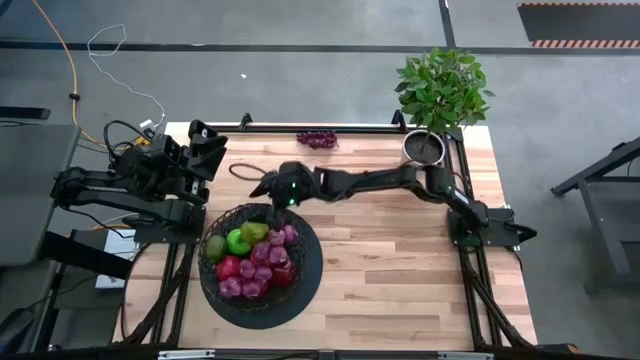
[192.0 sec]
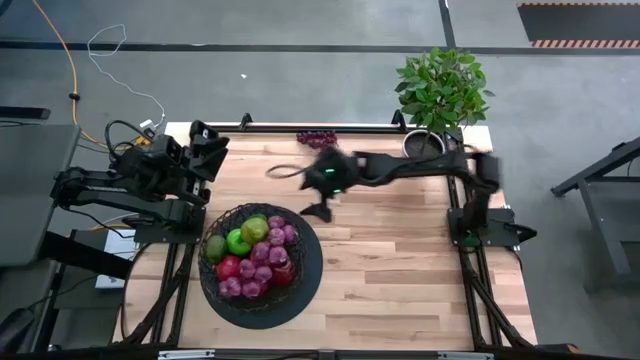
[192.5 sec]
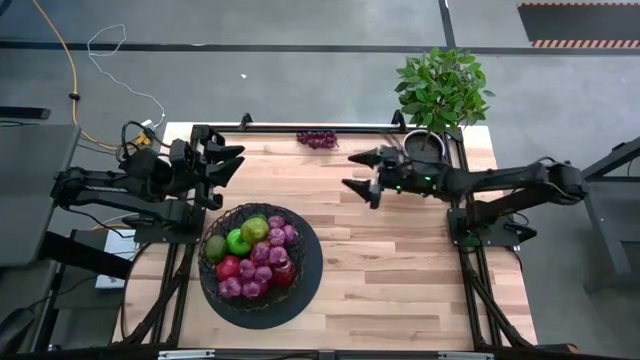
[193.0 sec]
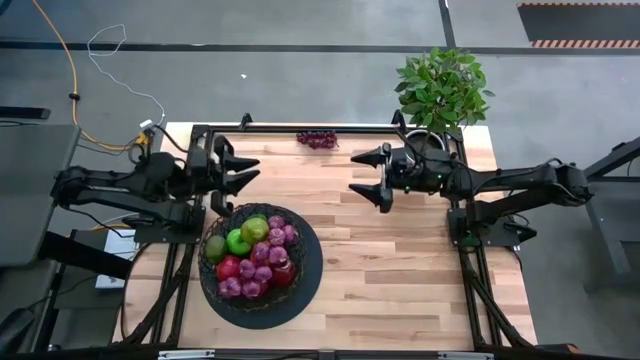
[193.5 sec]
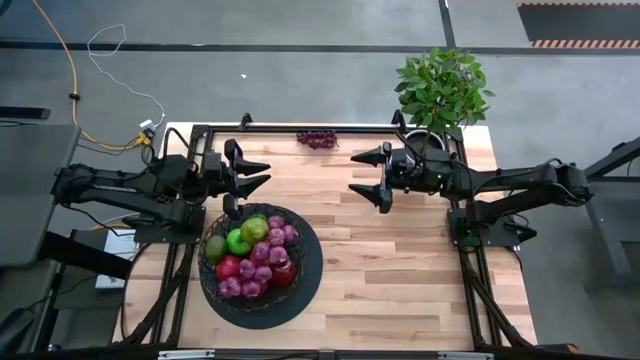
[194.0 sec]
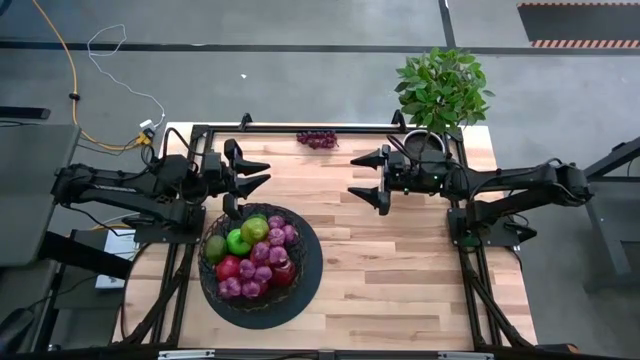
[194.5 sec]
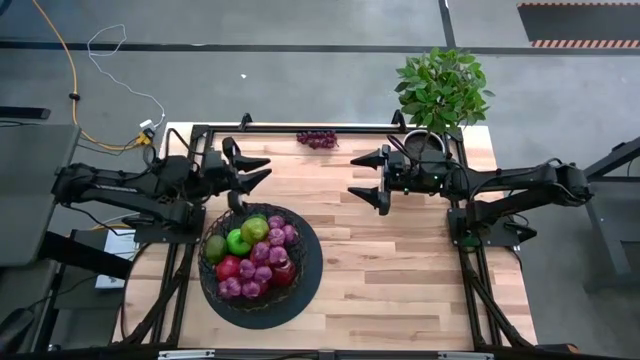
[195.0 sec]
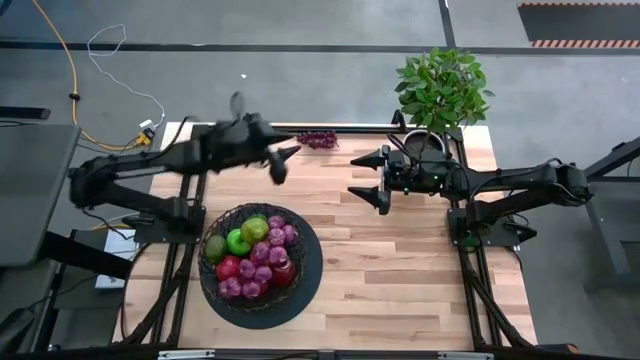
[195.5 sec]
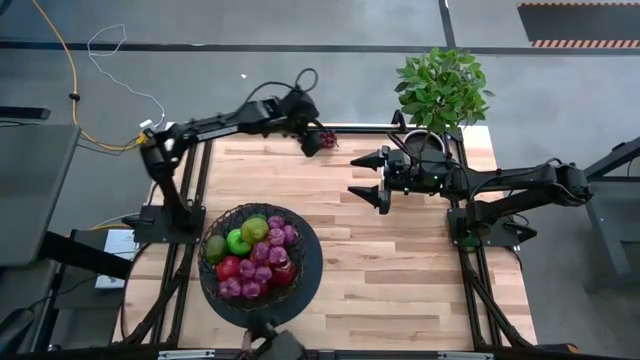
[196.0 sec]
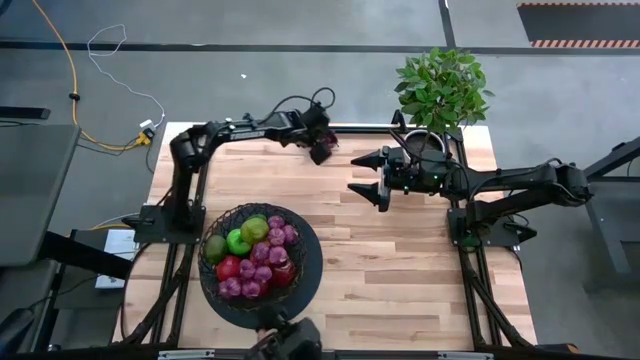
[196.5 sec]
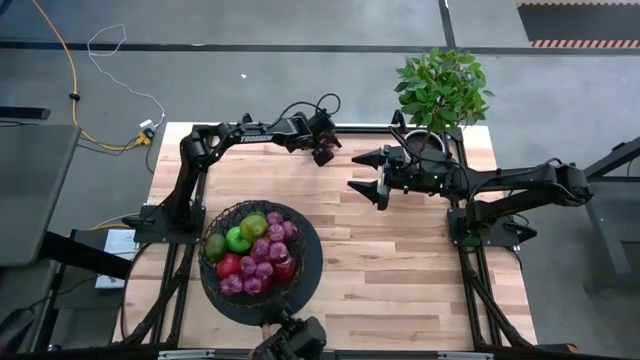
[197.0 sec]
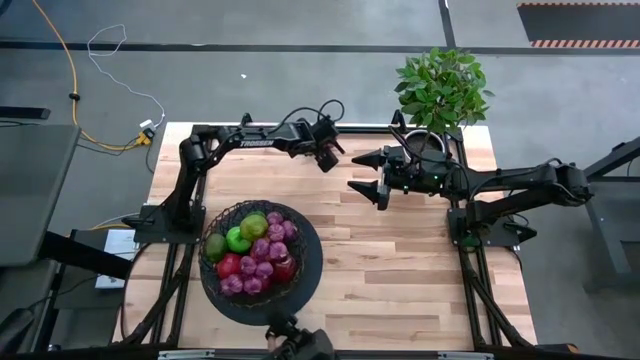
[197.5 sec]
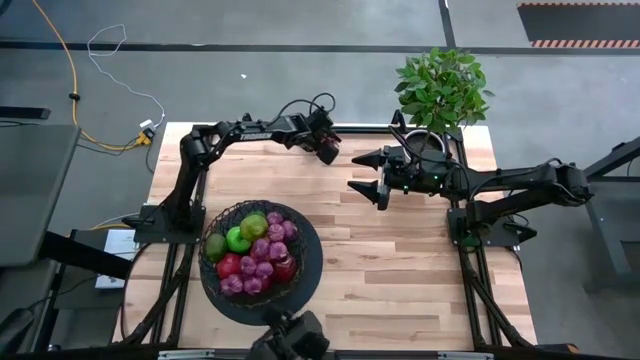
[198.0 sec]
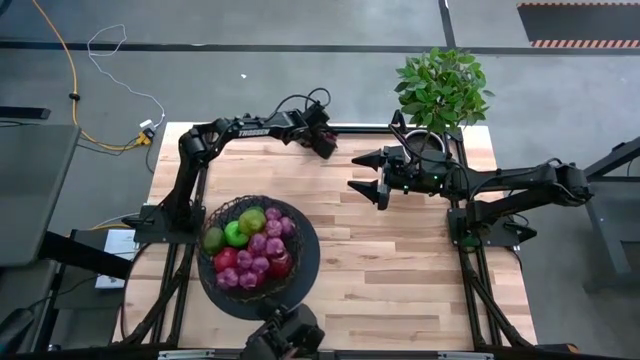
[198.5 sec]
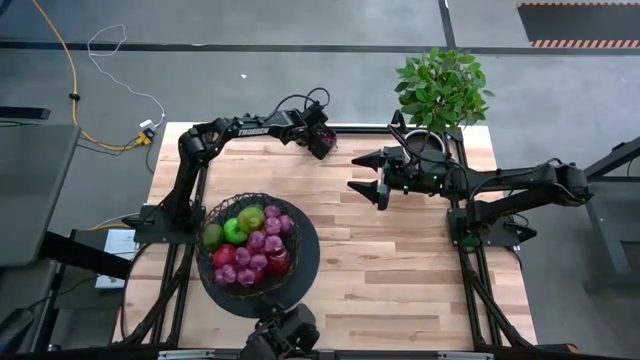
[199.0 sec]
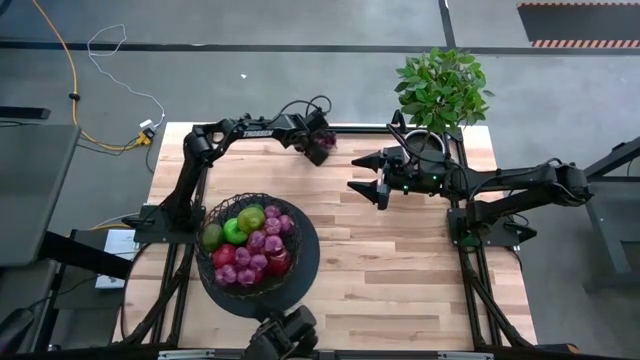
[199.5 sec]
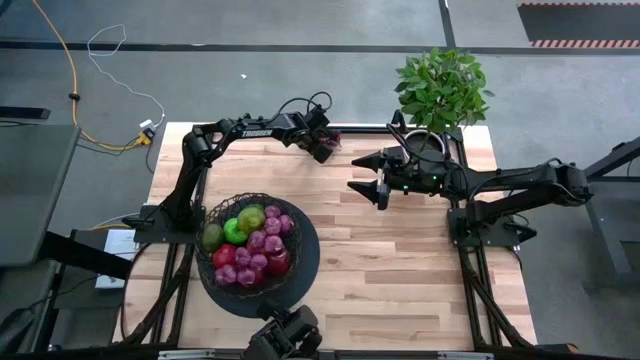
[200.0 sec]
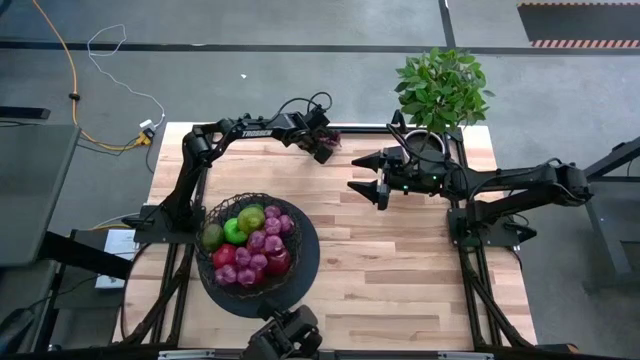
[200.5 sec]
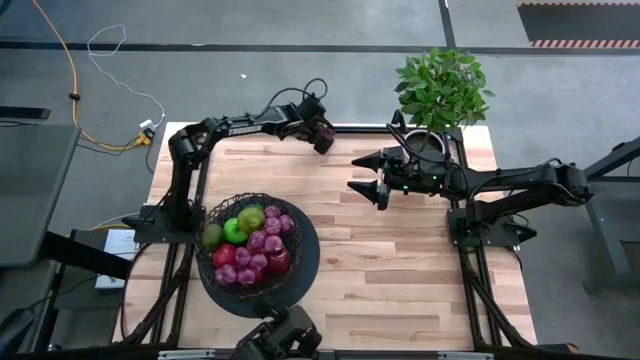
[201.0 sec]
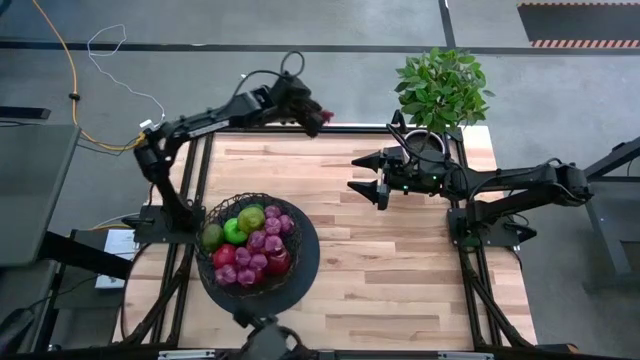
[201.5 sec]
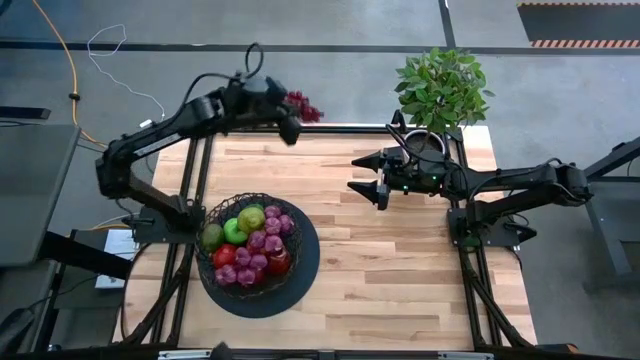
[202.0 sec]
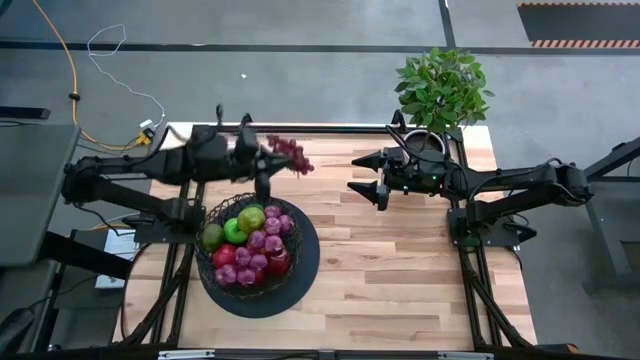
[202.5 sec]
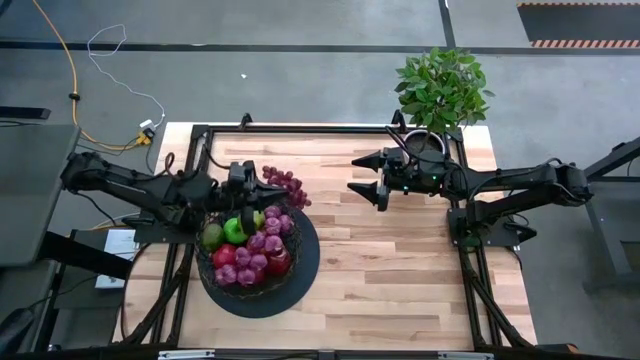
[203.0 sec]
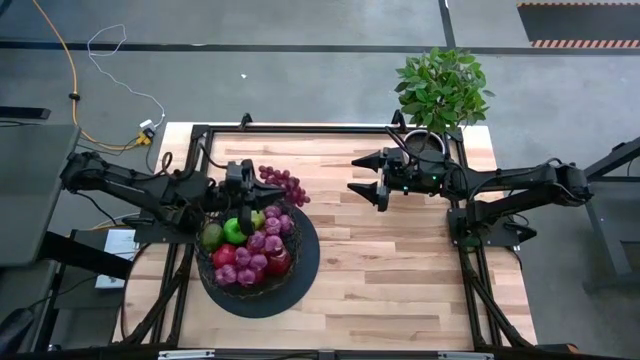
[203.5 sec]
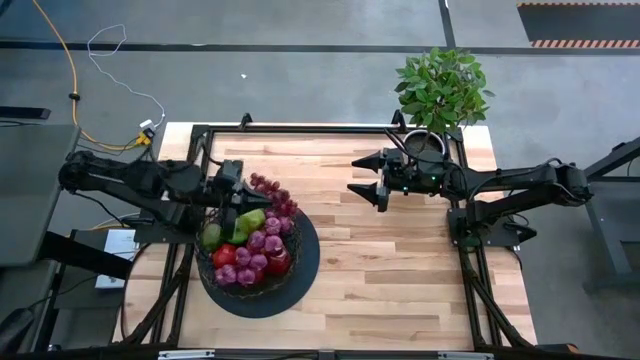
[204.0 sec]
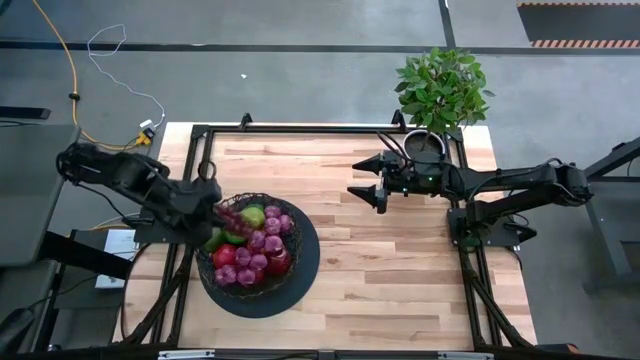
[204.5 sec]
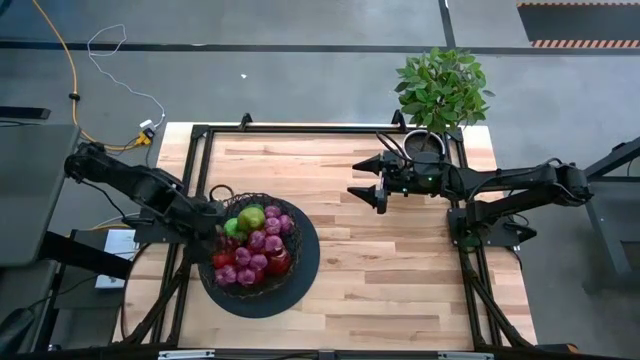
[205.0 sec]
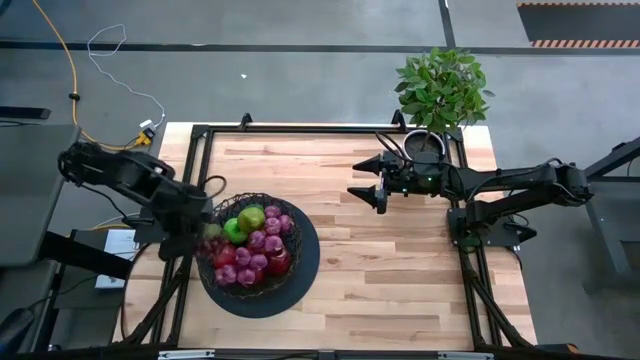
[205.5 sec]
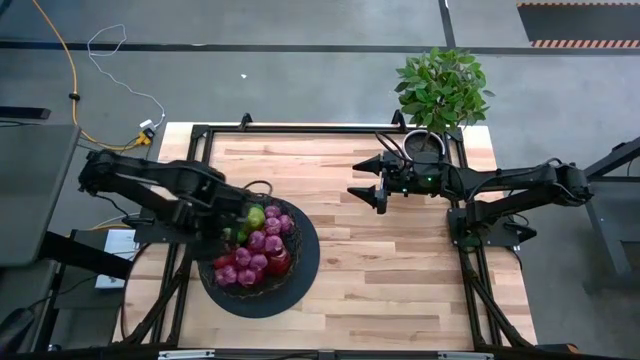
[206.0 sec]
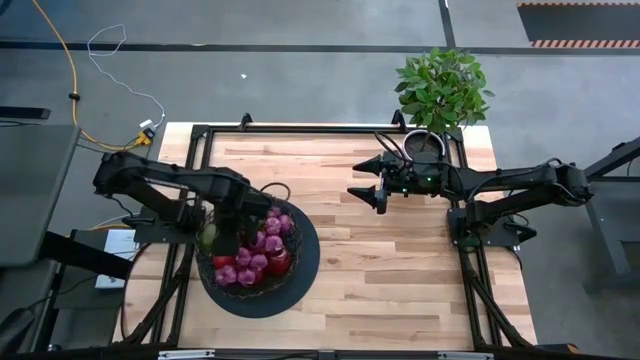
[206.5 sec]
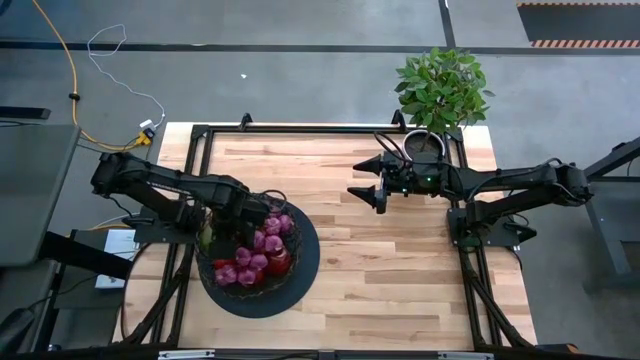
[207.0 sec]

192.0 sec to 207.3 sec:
Task: Build produce basket
Put the grapes into the black basket

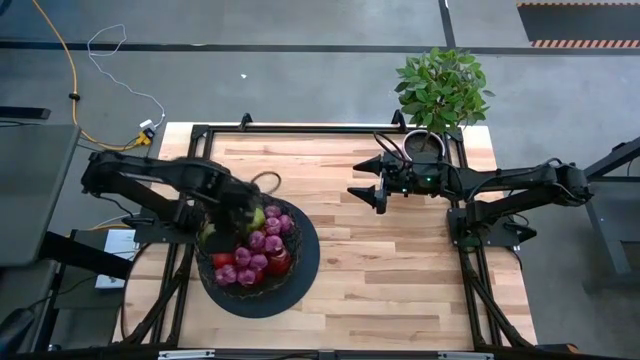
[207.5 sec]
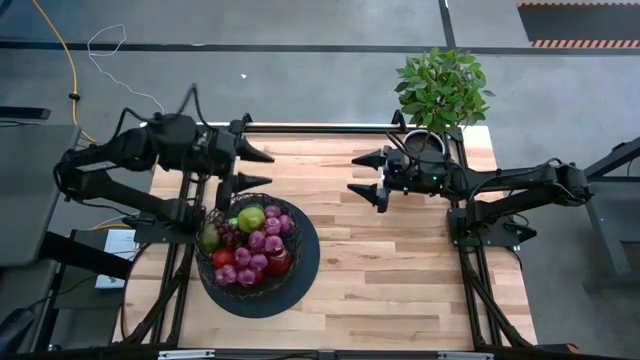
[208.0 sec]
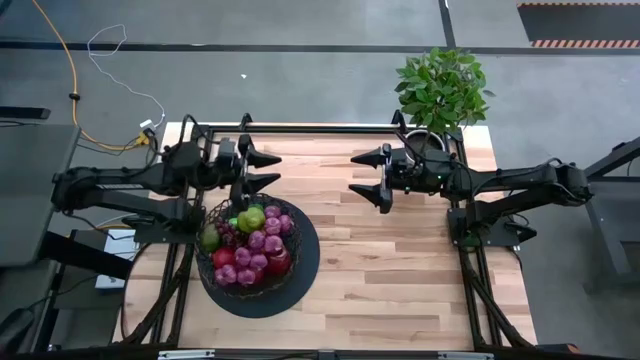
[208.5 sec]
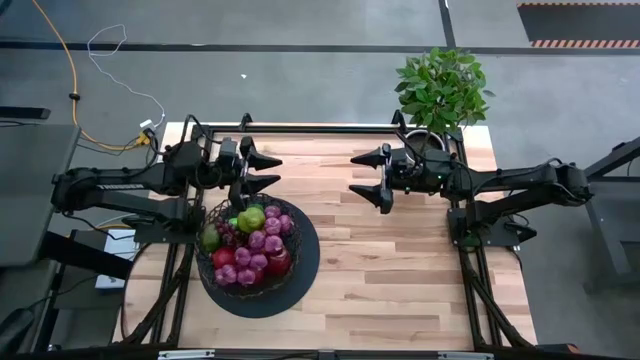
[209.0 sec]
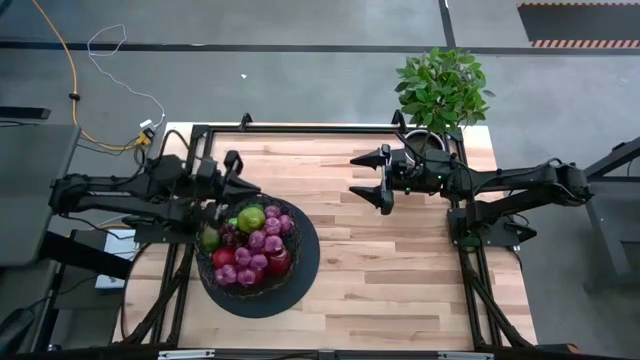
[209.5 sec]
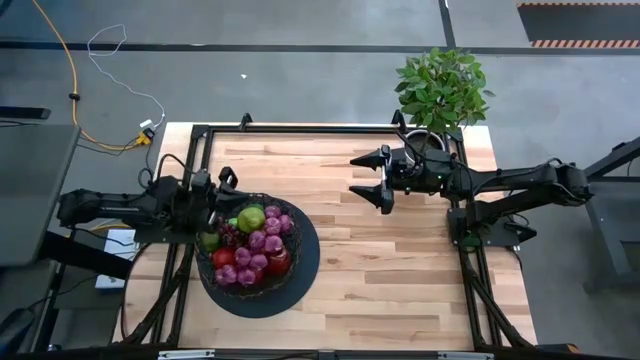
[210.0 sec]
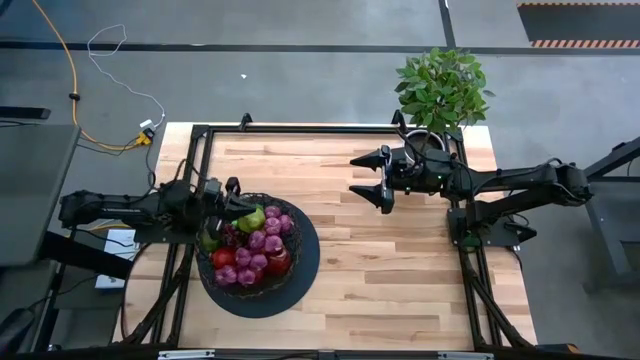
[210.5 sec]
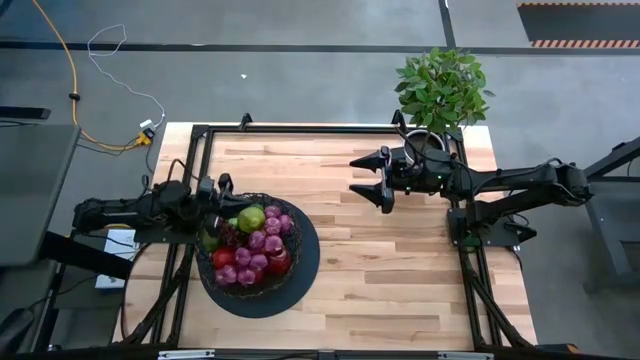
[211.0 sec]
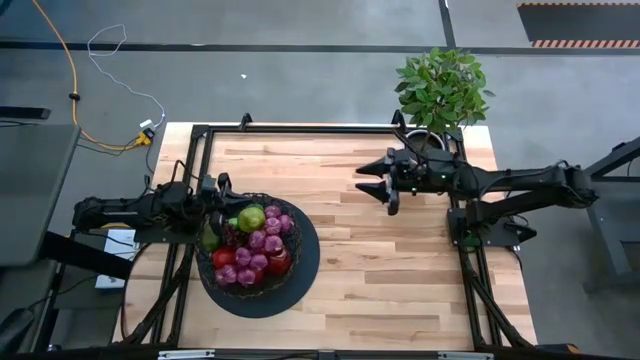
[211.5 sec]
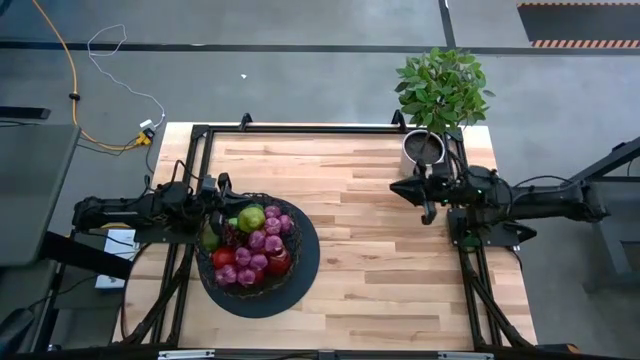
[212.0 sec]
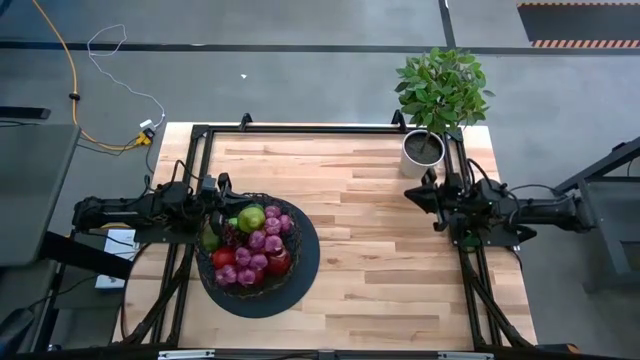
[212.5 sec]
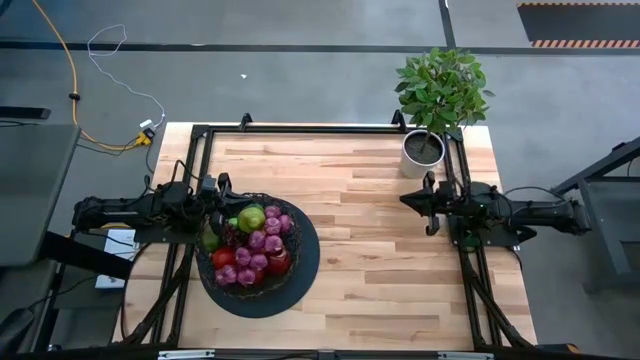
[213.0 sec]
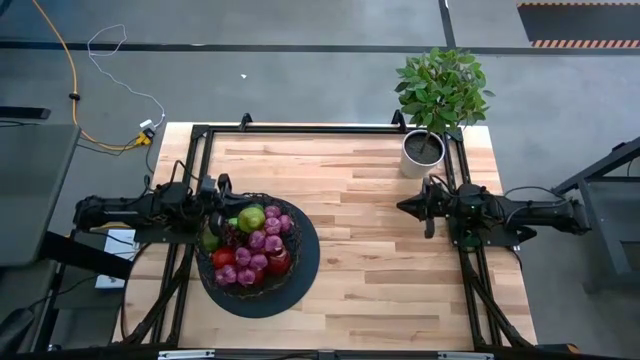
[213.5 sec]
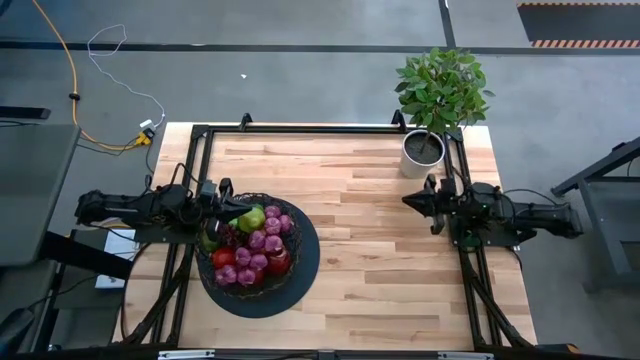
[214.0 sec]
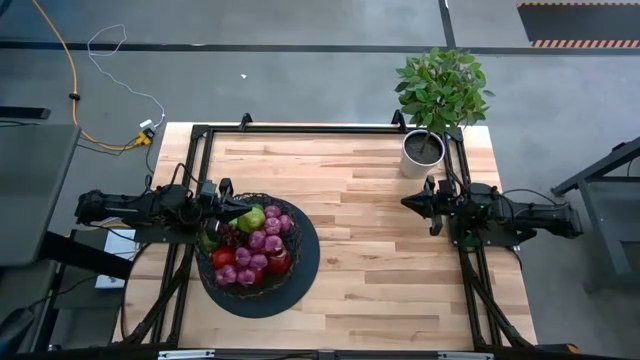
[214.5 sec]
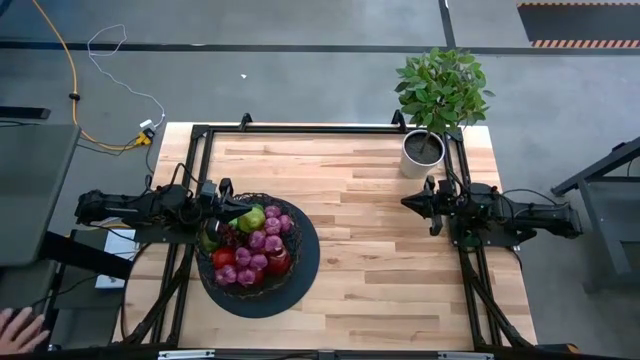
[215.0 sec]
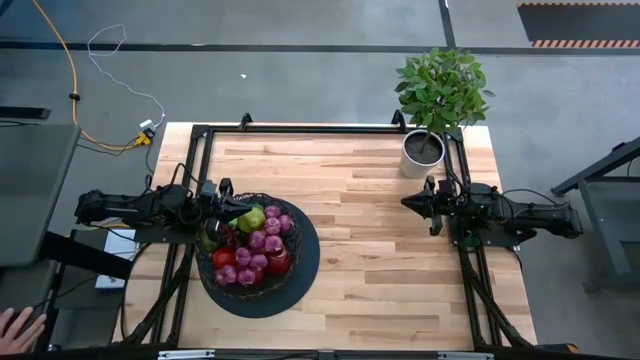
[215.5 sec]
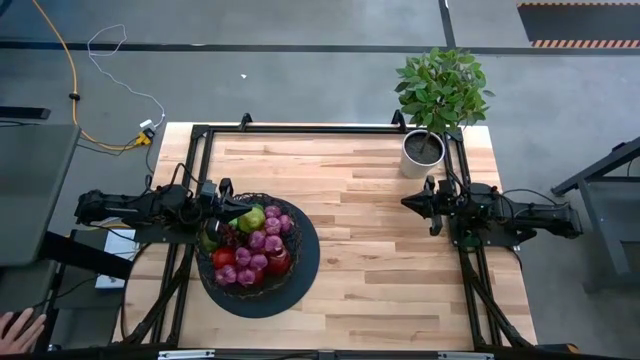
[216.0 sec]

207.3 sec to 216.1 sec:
Return to Home Position
